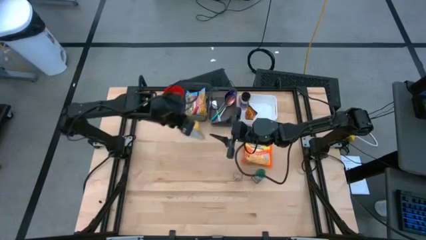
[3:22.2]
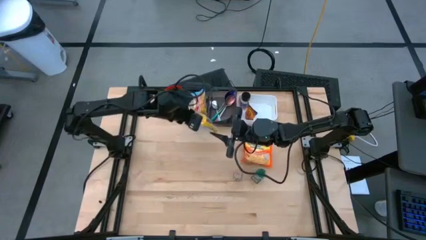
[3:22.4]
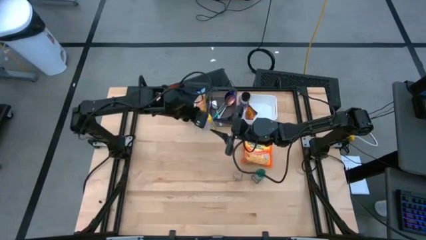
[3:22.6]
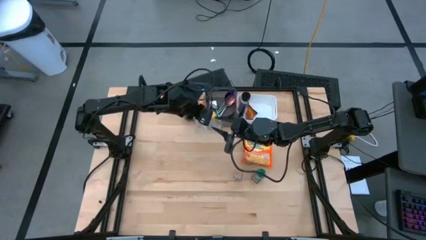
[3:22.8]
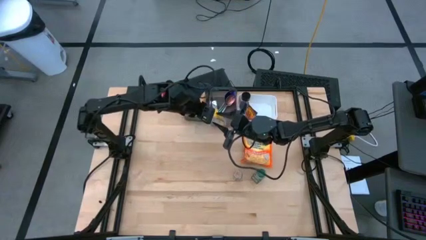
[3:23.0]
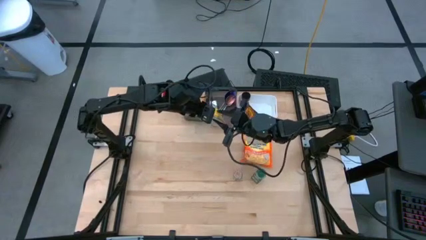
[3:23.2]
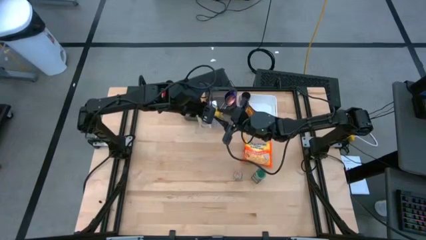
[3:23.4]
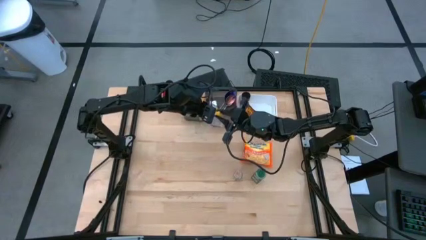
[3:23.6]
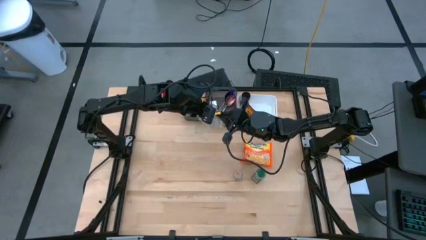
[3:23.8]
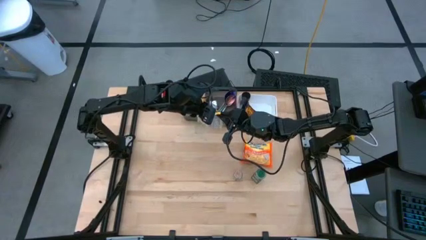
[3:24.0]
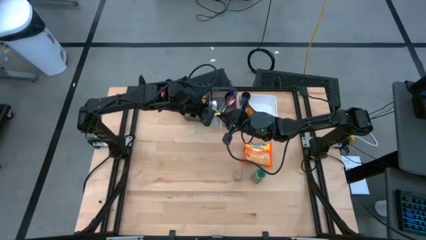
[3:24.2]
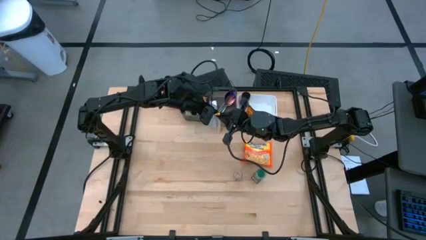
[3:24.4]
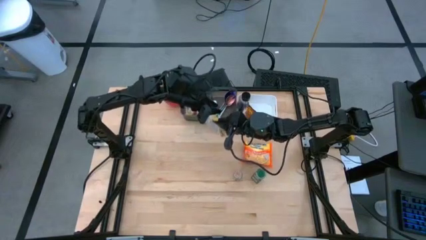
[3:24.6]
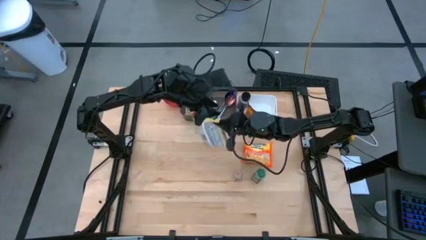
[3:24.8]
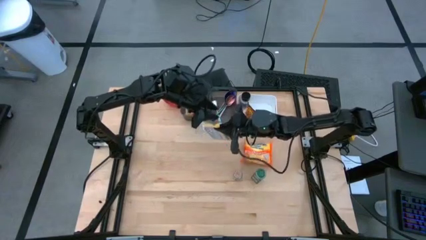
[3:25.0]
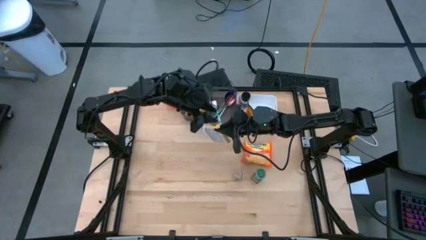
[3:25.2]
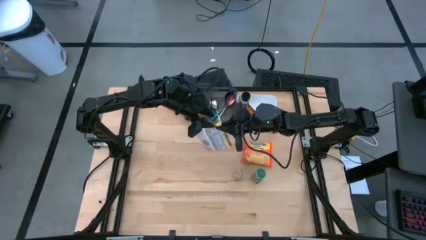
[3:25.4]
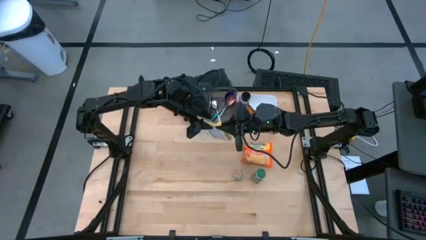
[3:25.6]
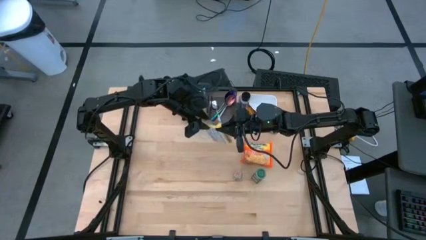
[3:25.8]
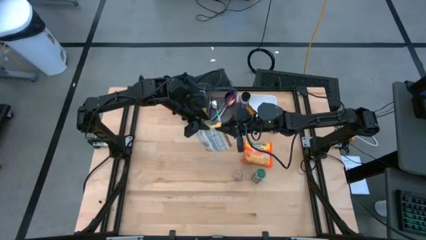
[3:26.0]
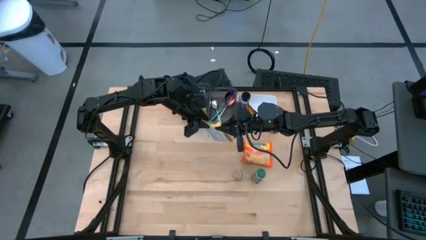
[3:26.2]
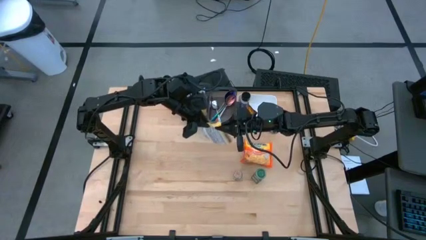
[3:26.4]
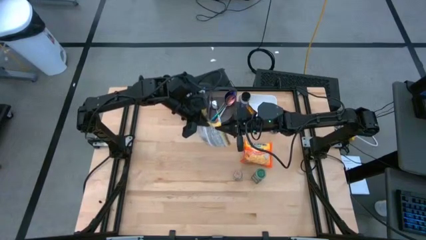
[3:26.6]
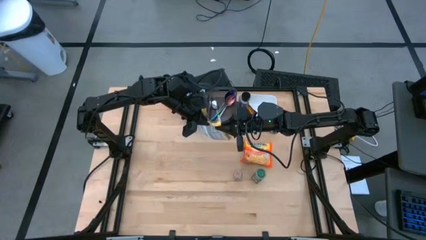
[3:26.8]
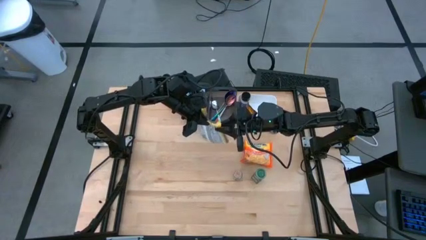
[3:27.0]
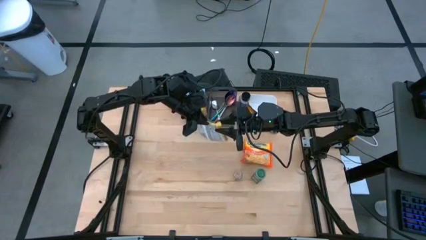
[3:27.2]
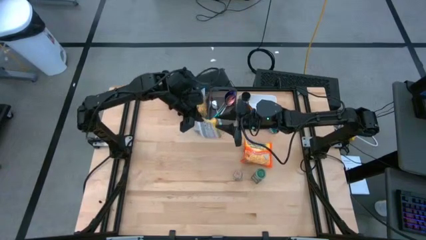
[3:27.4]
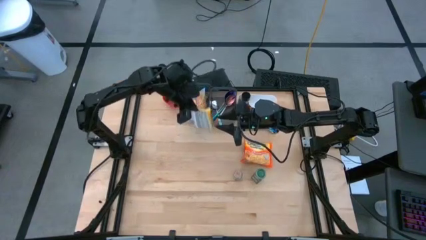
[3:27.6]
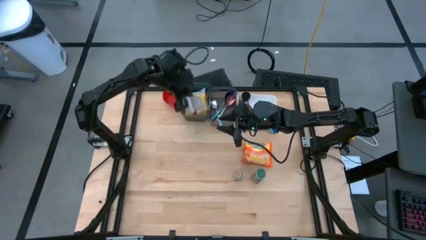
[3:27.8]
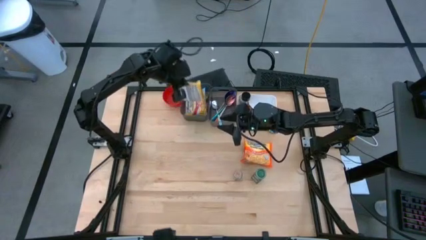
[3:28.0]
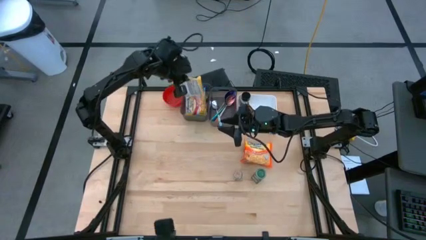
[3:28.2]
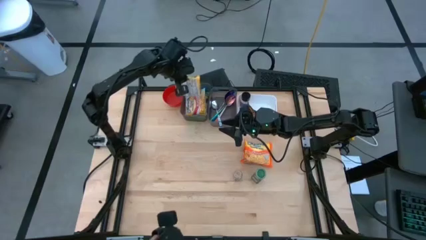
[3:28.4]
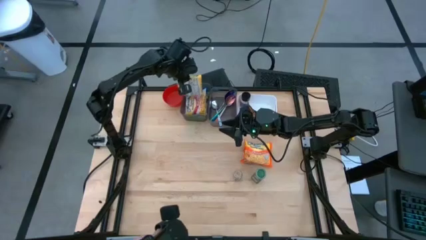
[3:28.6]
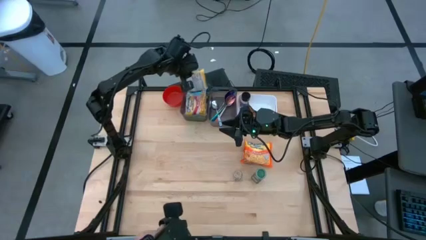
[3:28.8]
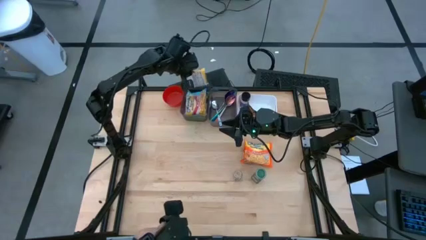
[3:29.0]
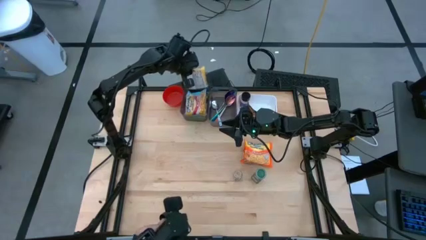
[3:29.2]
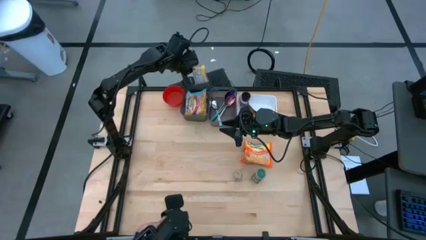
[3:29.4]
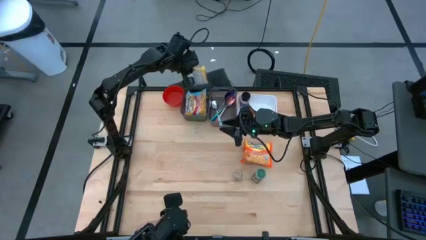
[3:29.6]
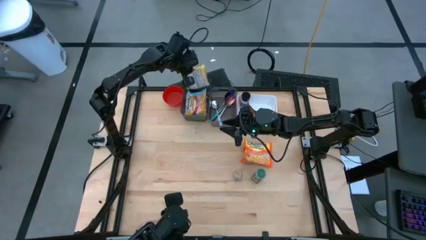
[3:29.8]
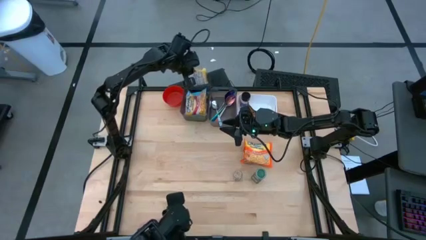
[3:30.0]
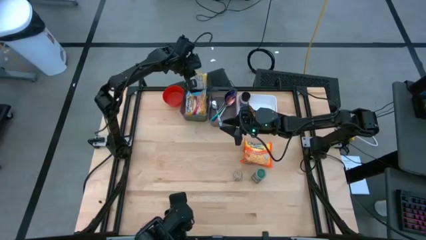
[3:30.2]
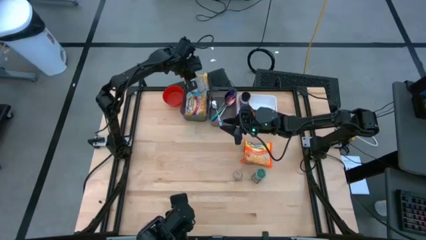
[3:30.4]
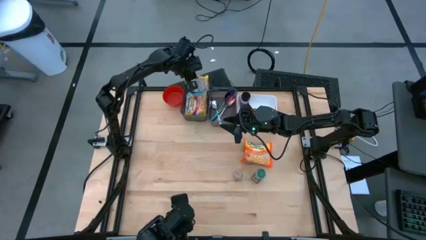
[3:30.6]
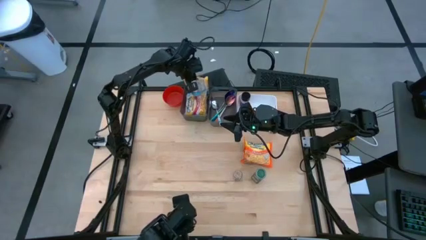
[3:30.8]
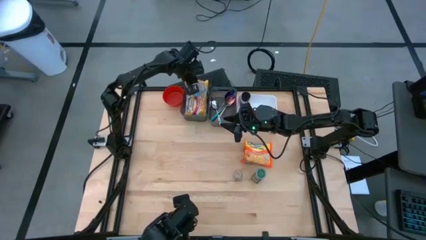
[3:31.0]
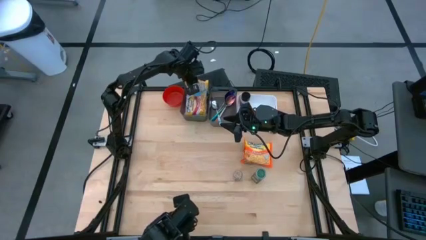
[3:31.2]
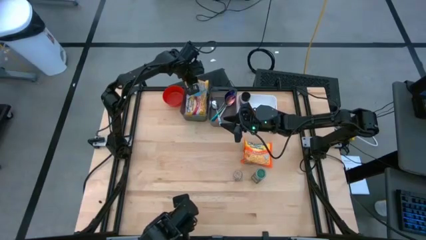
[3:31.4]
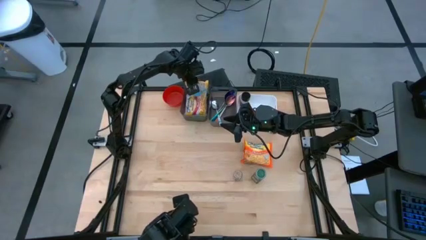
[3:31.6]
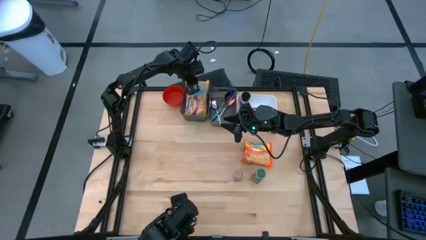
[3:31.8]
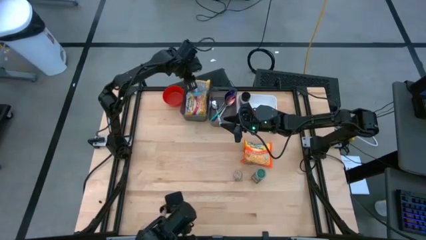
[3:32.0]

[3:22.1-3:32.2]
Task: Pick & Place Food Item
Put the yellow noodle pack into the left black bin

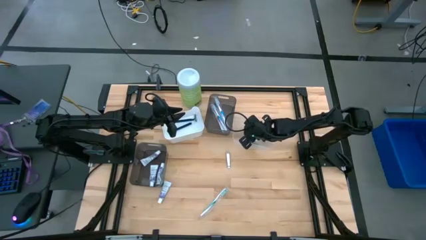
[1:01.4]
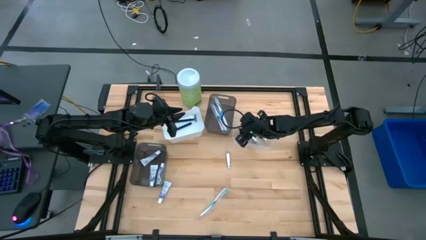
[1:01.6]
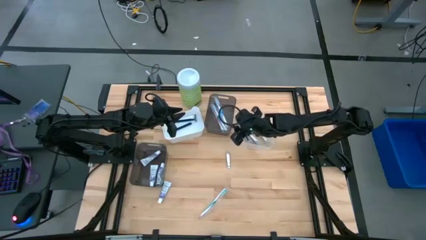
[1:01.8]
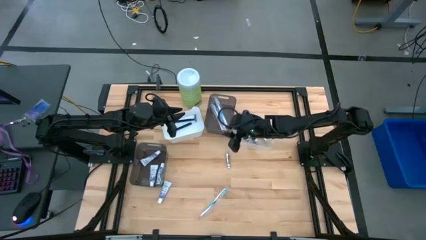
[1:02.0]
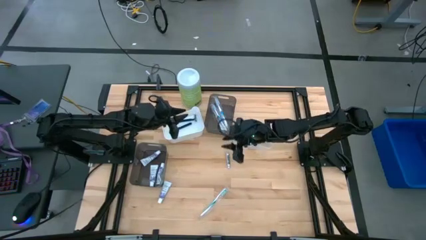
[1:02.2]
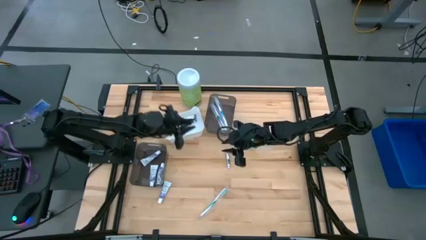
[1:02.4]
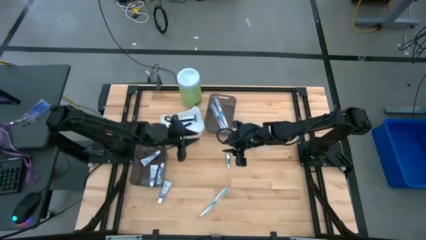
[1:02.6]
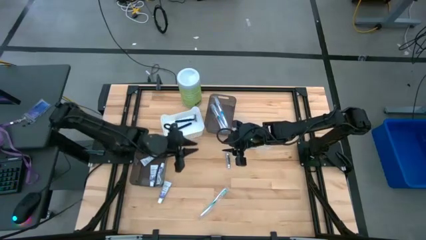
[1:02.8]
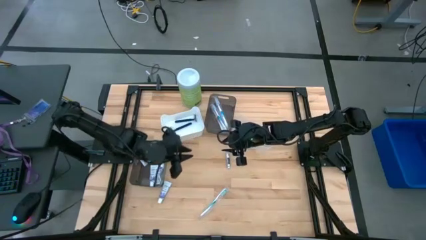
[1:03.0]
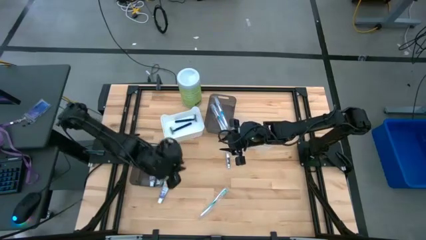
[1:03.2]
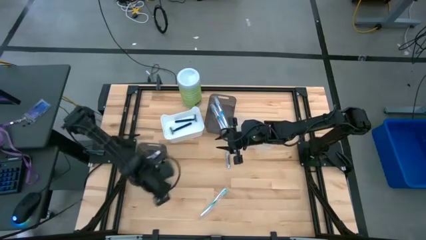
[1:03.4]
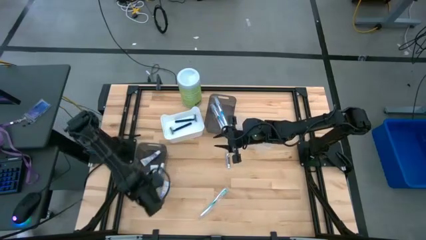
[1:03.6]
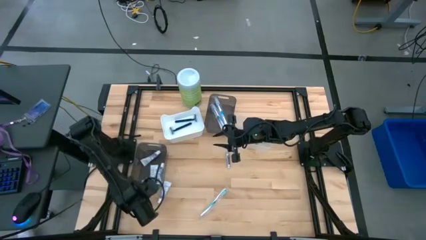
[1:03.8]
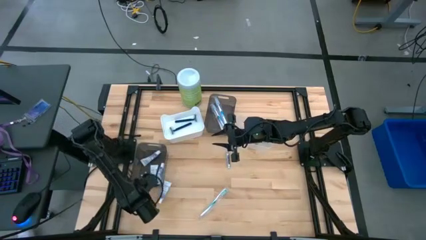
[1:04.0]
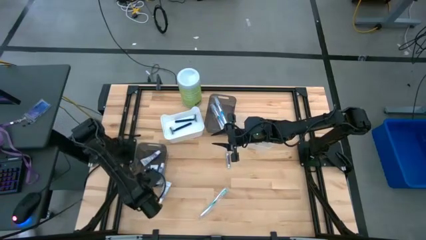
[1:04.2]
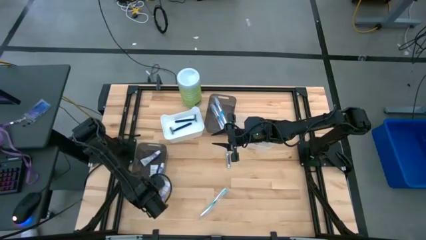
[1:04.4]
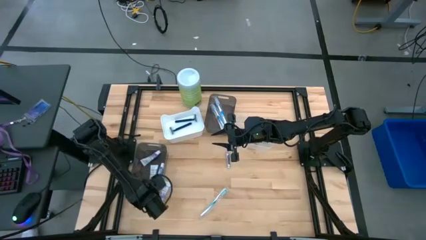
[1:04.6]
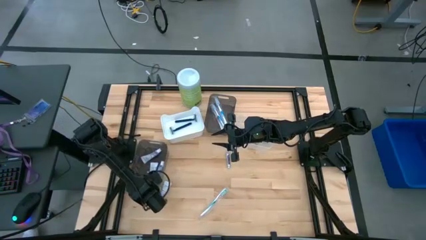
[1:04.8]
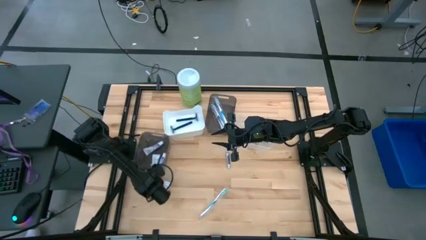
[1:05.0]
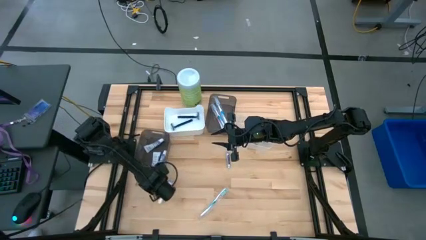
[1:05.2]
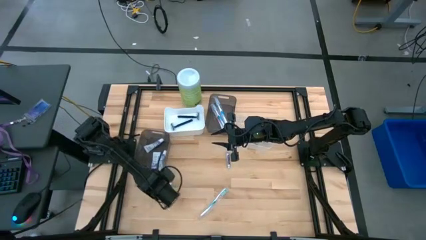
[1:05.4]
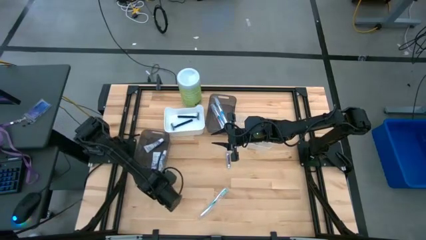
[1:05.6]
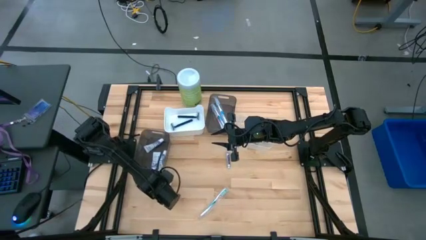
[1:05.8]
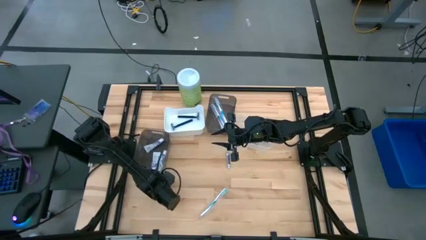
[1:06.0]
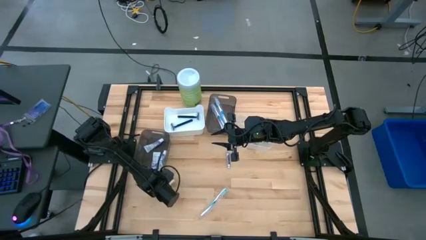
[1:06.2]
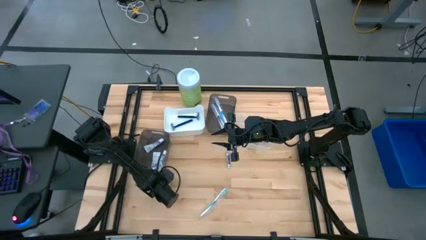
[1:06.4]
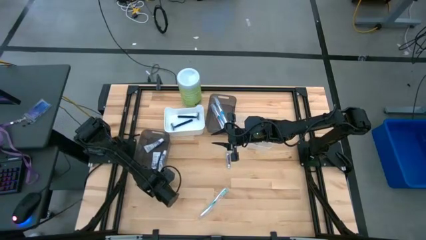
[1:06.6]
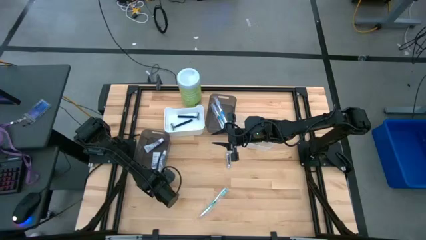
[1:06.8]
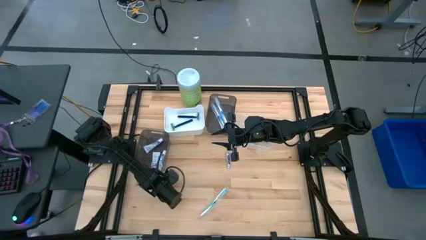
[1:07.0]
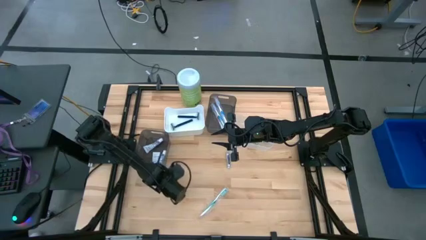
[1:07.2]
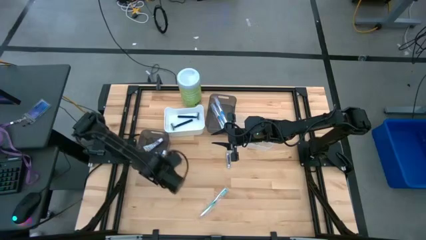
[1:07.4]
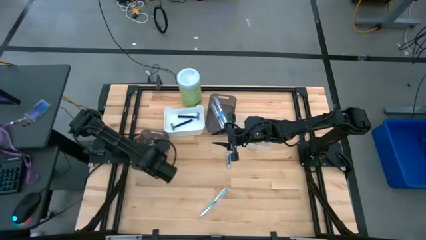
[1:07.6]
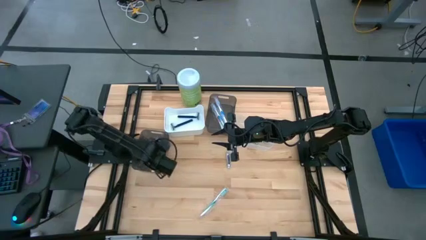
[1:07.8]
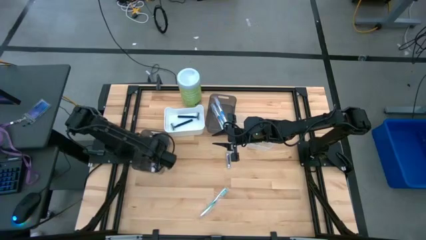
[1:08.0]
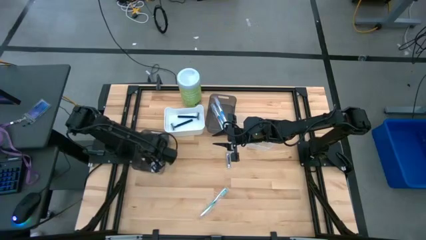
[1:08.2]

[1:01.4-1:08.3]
Task: Pick & Place Travel size toiletries
Put the purple toothpaste into the bottom black bin
